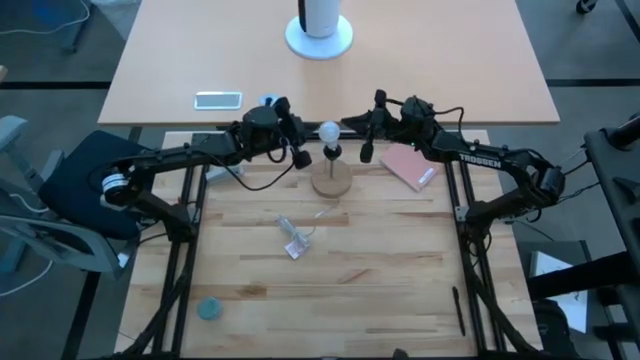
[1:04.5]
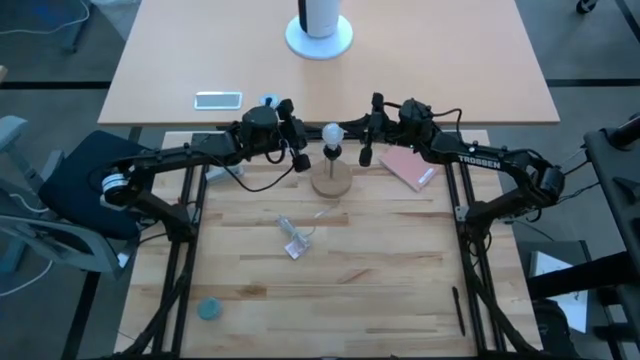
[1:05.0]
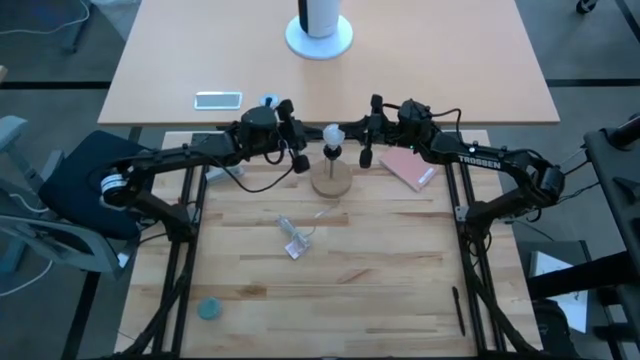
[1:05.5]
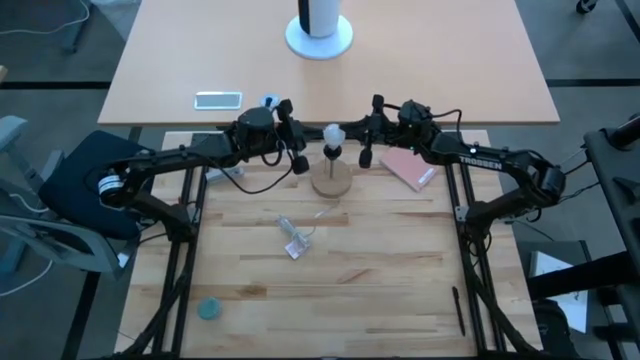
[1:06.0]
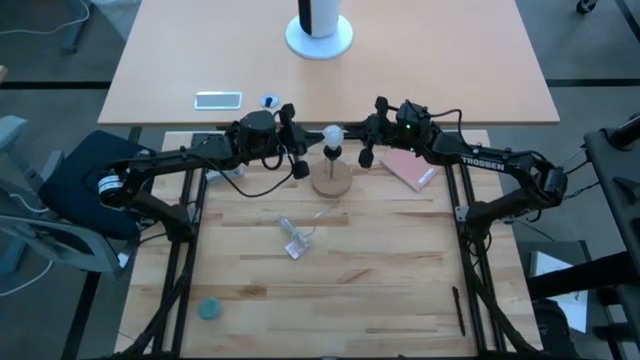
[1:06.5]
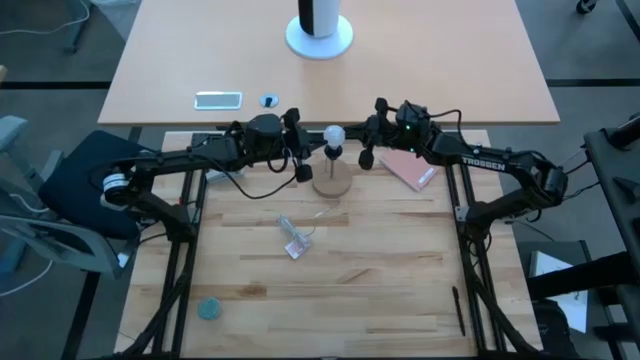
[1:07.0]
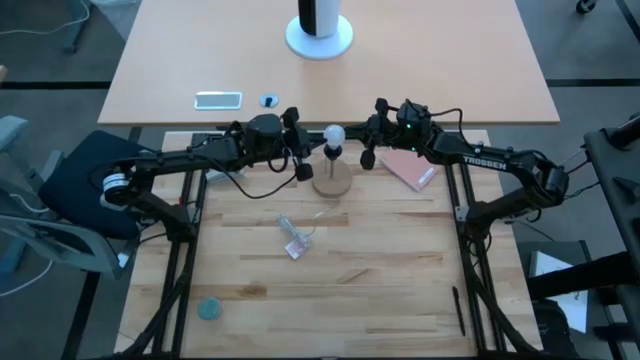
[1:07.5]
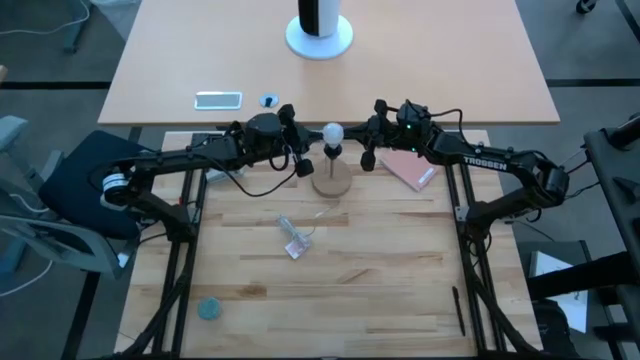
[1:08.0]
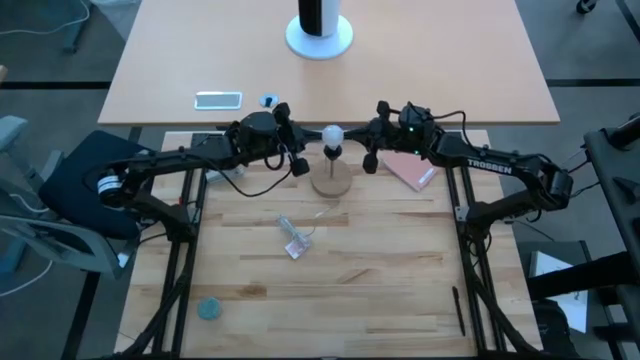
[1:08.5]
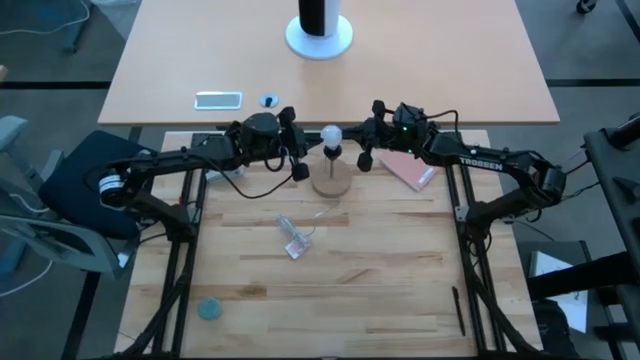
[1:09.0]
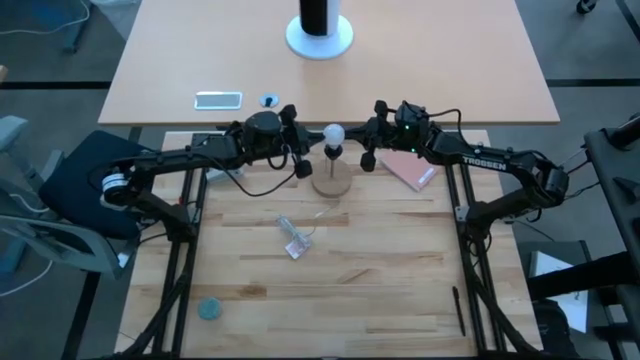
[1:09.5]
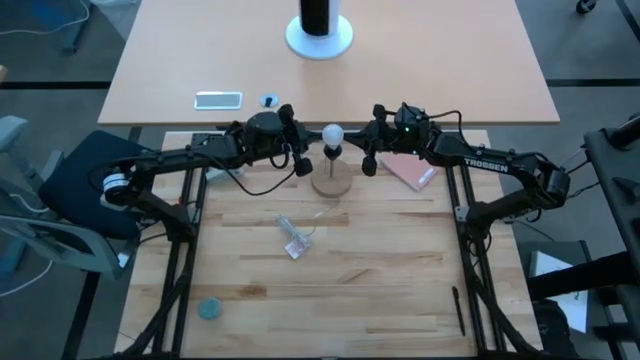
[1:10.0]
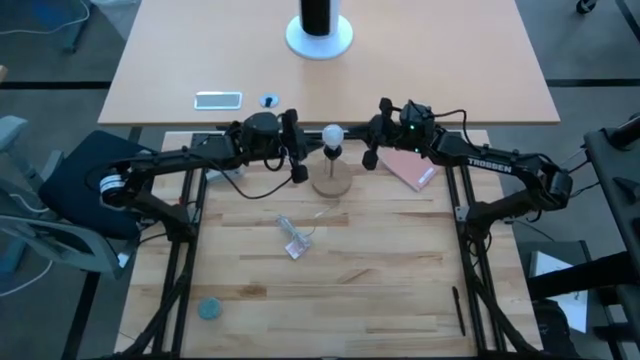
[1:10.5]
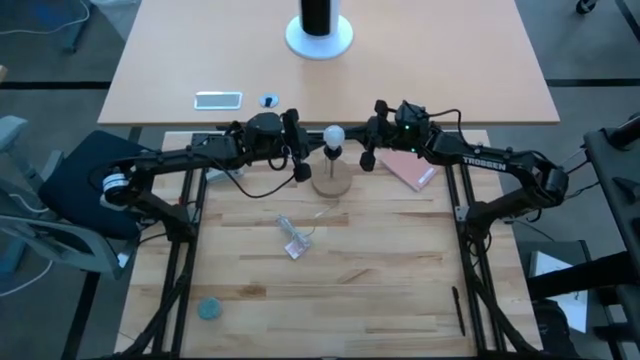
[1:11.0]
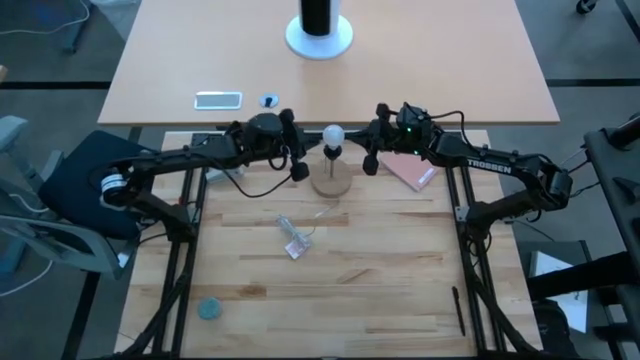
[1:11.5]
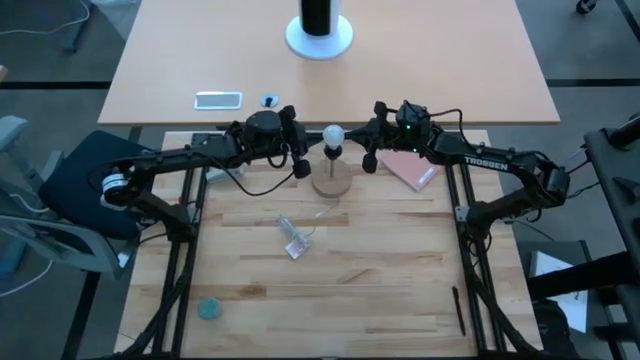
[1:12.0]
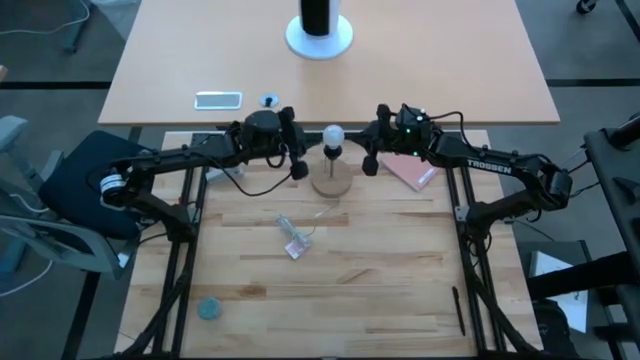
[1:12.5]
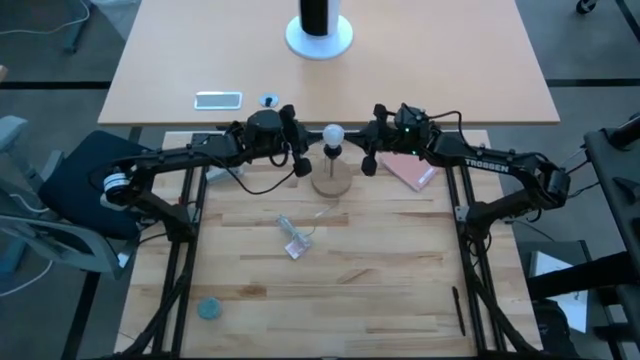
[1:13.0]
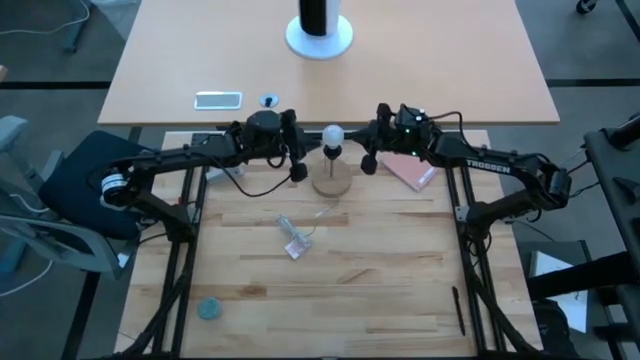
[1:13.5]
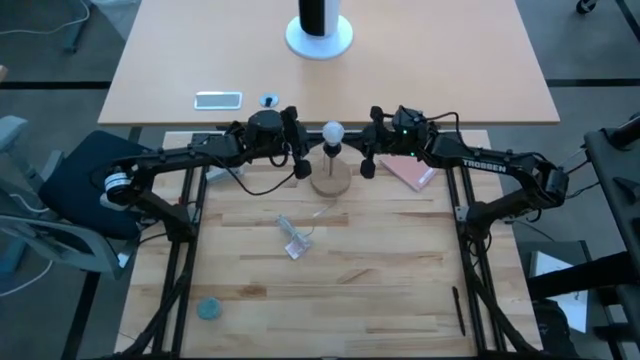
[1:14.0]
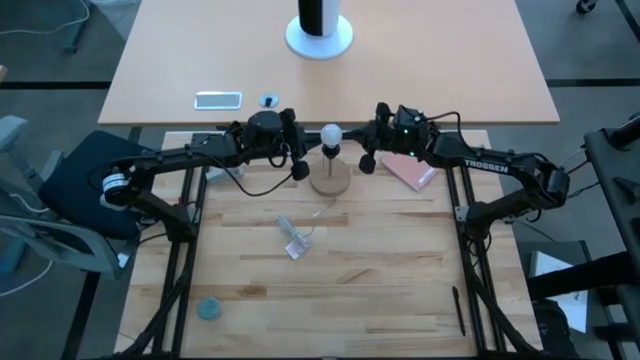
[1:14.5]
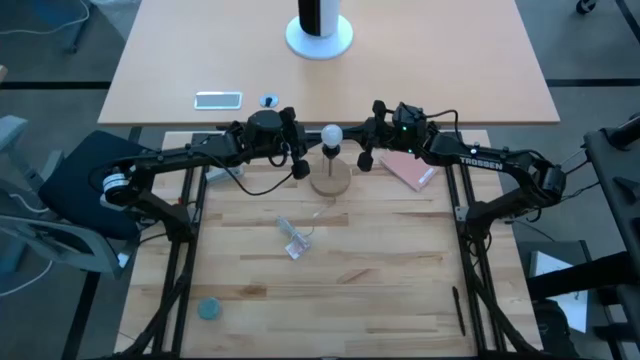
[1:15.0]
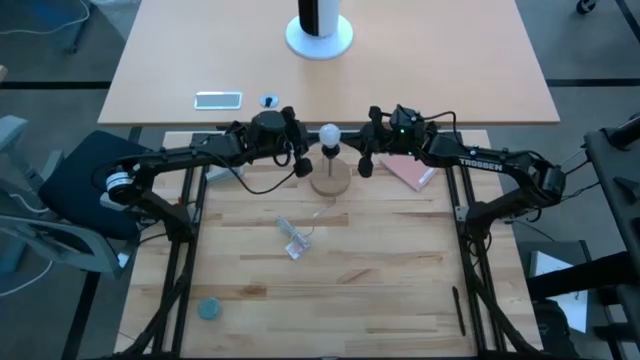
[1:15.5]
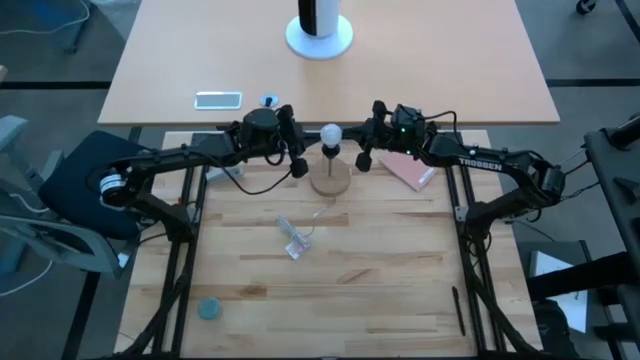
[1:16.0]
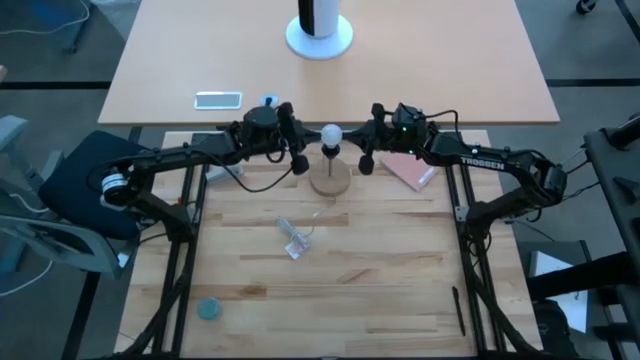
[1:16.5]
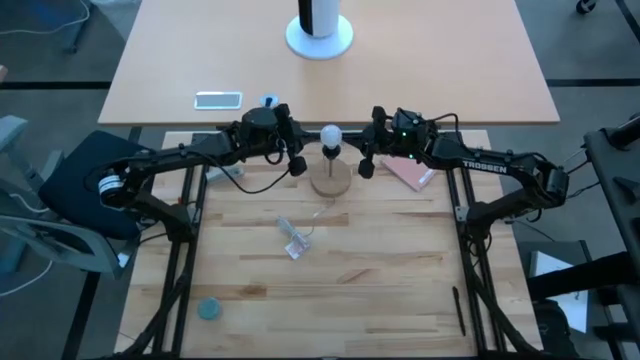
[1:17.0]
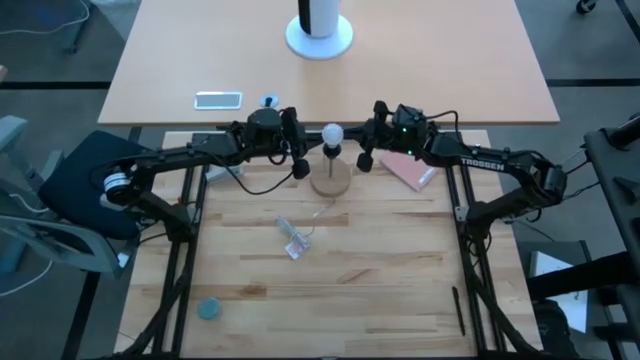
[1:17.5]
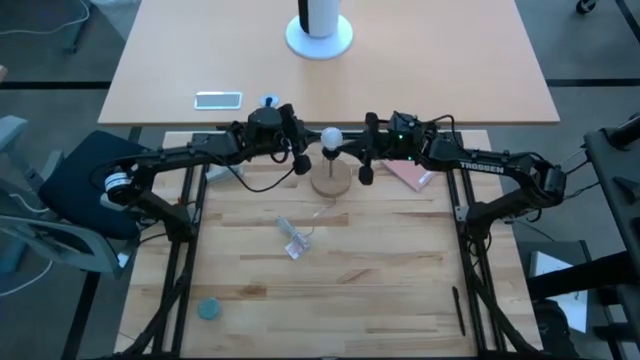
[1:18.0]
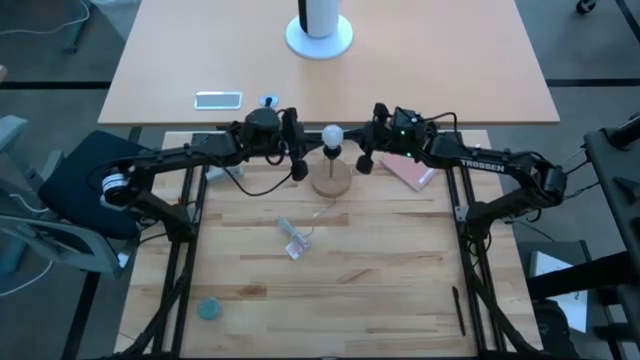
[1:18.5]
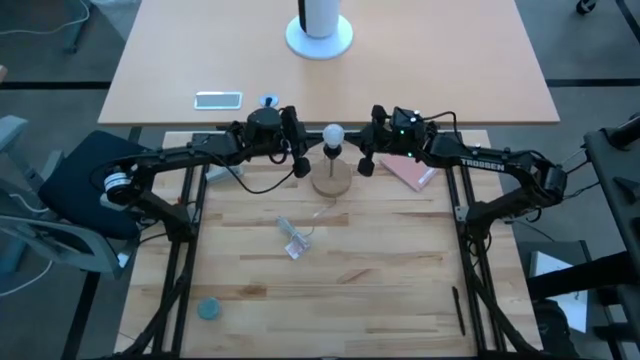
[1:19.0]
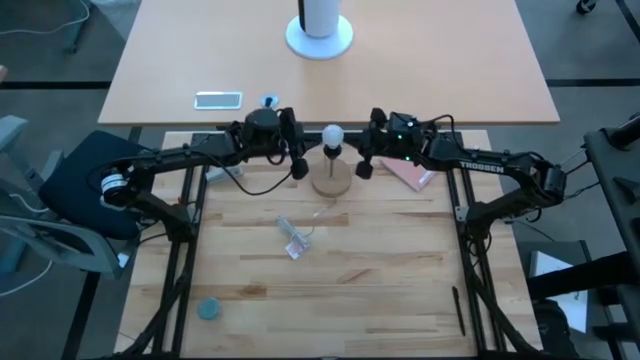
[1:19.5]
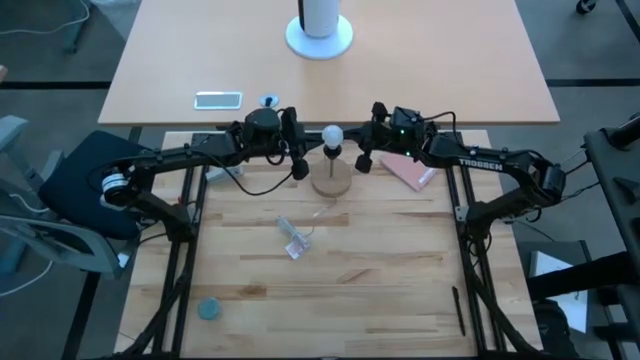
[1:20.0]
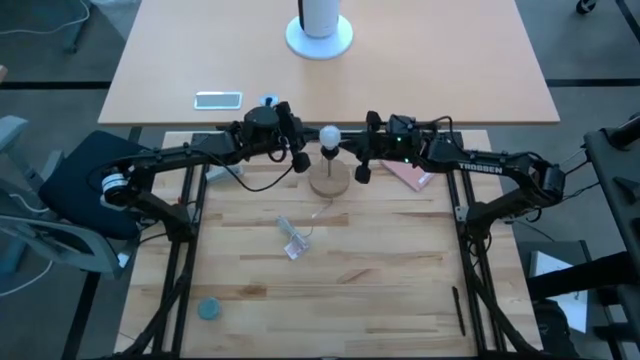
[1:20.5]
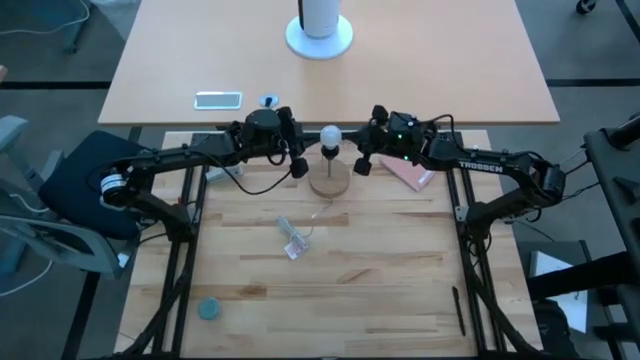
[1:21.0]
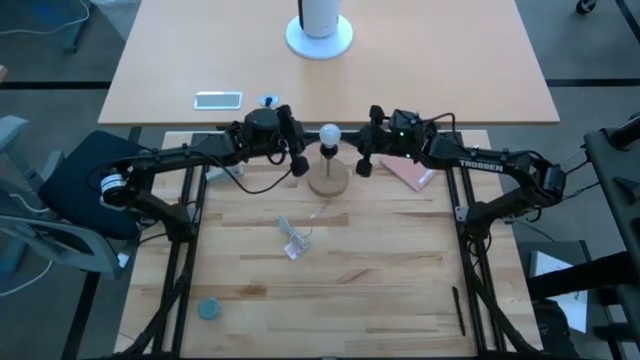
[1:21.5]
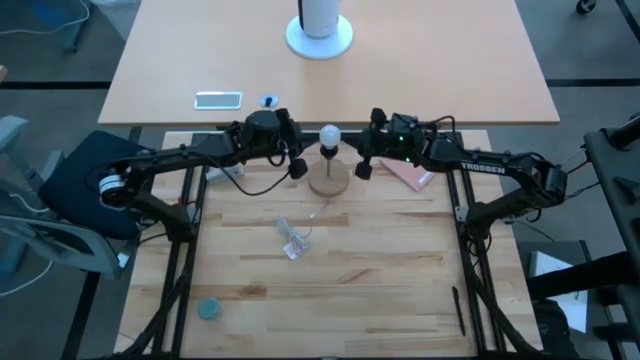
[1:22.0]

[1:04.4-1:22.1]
Task: Screw lightbulb
Insert the lightbulb on the desk lamp
